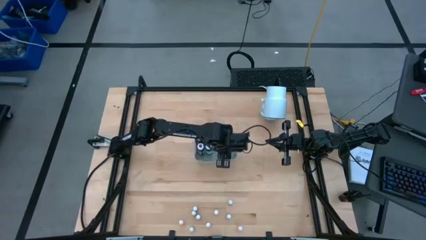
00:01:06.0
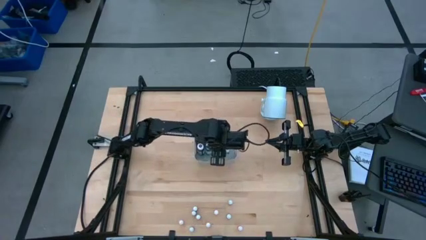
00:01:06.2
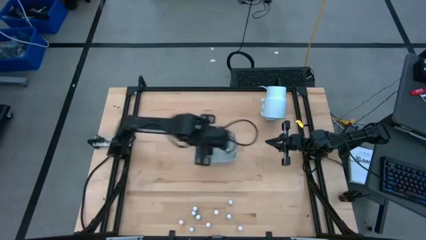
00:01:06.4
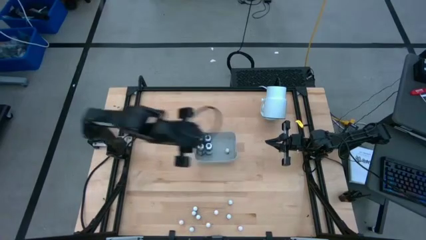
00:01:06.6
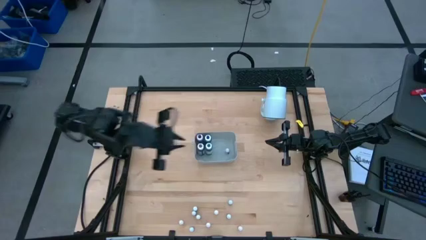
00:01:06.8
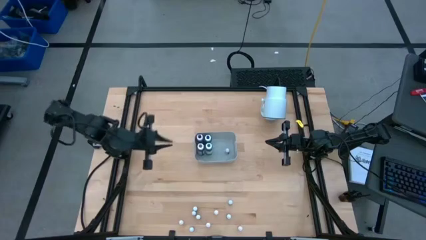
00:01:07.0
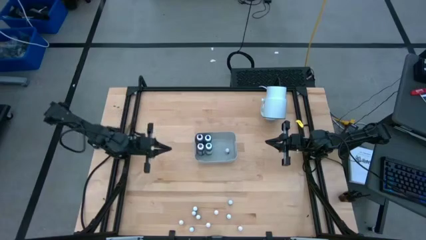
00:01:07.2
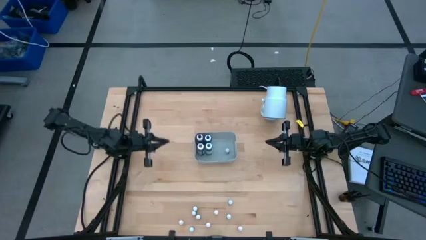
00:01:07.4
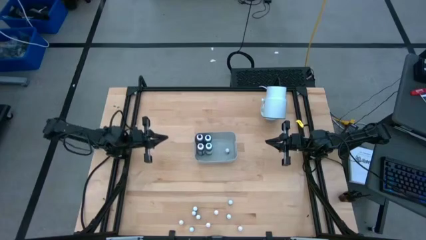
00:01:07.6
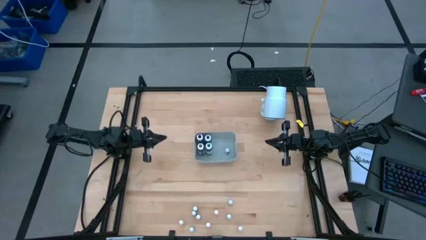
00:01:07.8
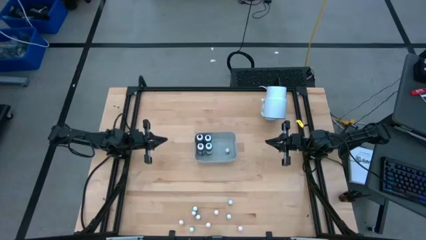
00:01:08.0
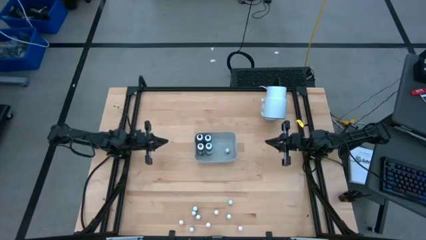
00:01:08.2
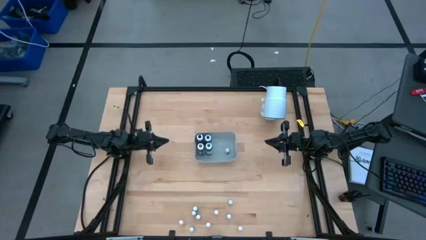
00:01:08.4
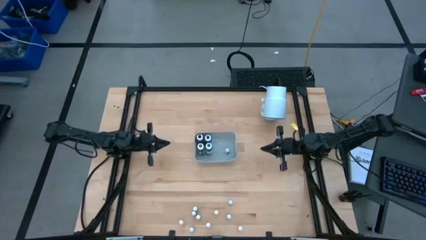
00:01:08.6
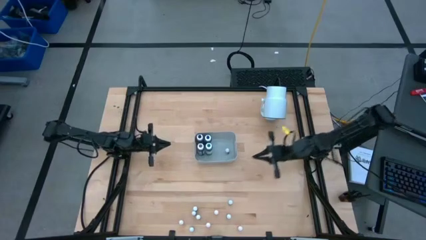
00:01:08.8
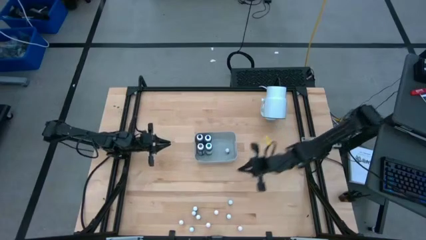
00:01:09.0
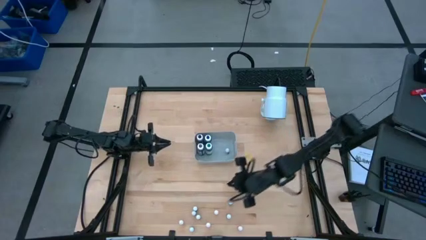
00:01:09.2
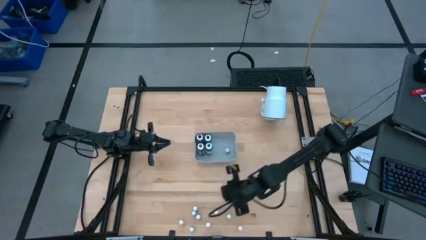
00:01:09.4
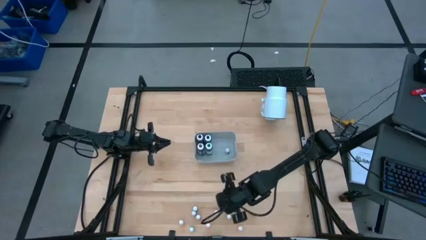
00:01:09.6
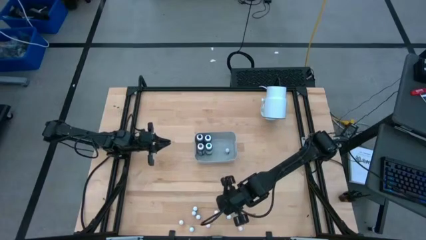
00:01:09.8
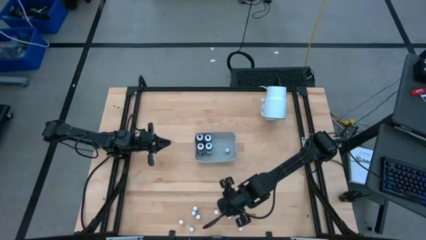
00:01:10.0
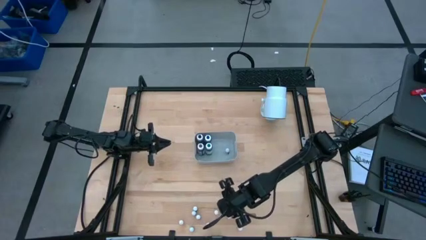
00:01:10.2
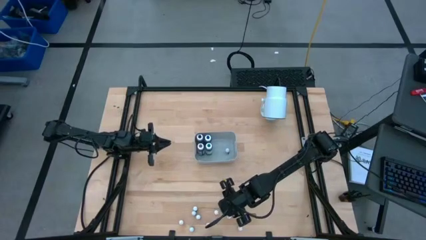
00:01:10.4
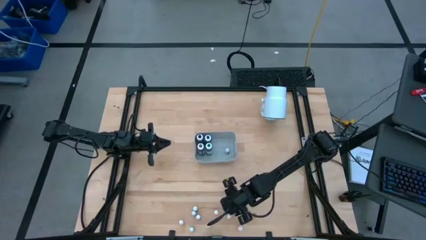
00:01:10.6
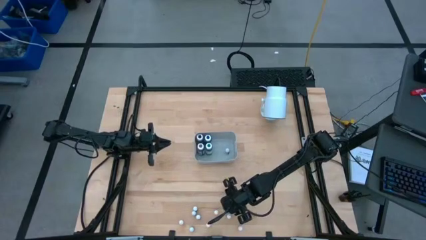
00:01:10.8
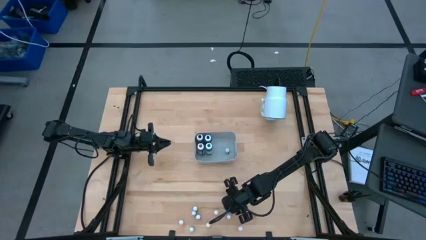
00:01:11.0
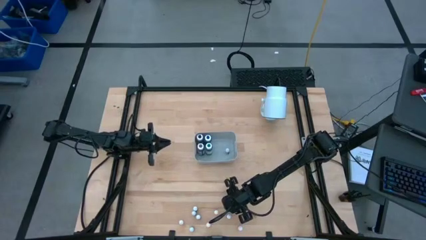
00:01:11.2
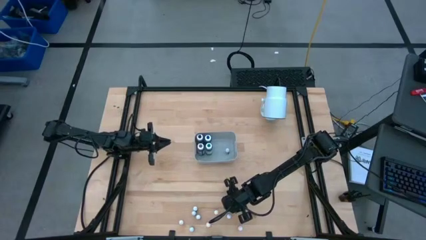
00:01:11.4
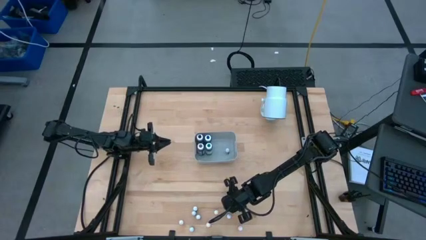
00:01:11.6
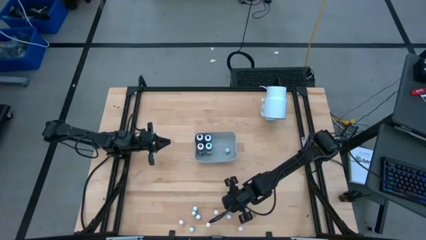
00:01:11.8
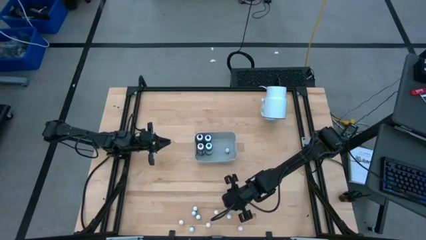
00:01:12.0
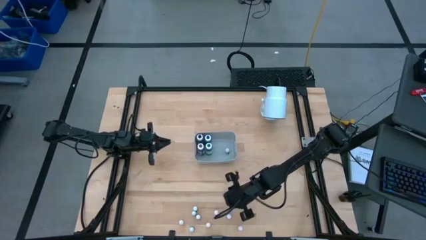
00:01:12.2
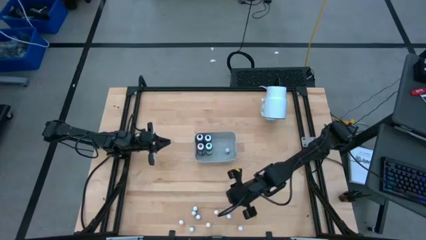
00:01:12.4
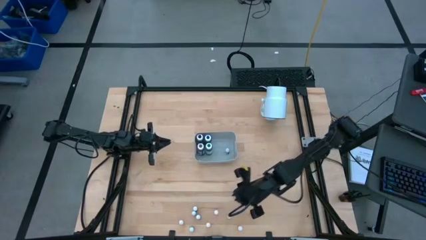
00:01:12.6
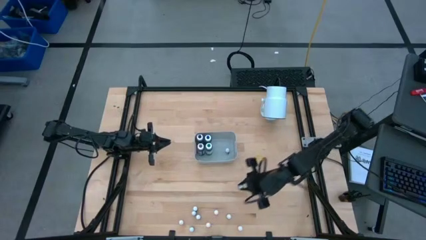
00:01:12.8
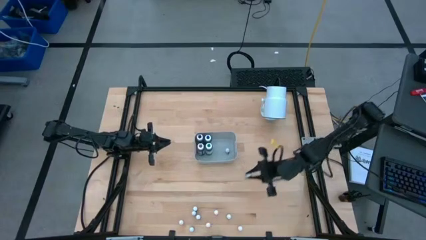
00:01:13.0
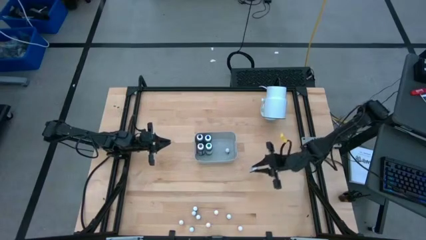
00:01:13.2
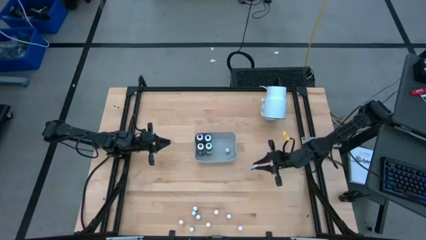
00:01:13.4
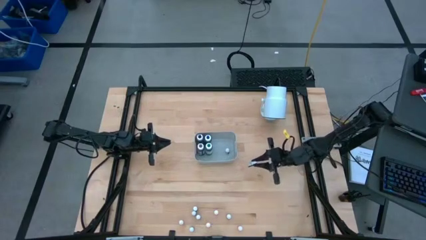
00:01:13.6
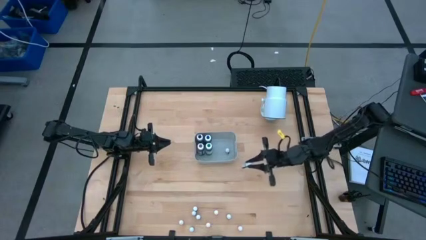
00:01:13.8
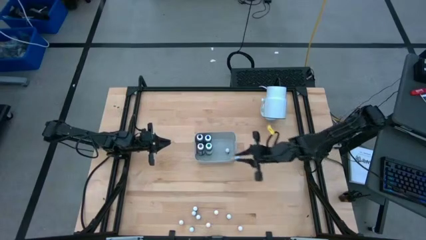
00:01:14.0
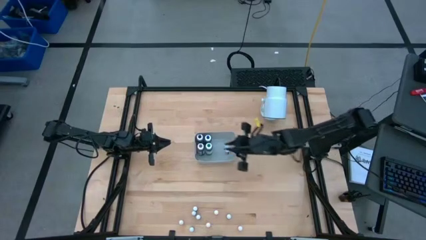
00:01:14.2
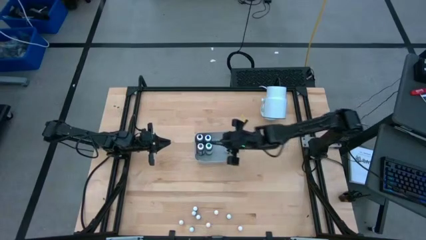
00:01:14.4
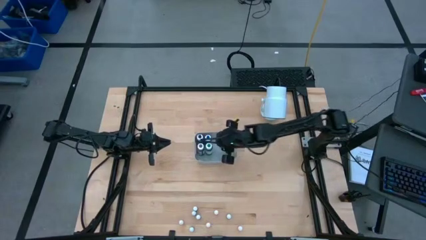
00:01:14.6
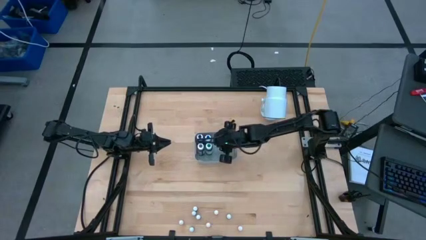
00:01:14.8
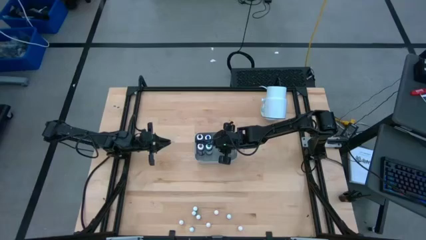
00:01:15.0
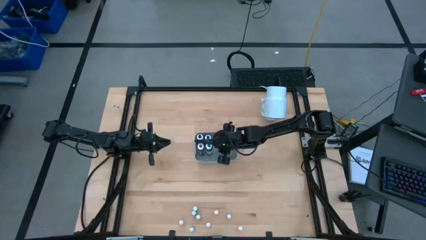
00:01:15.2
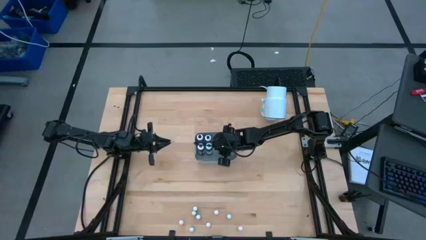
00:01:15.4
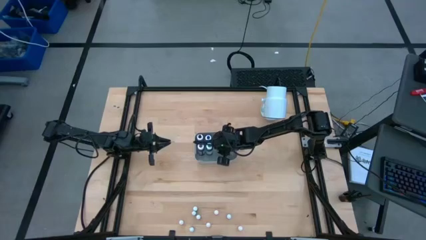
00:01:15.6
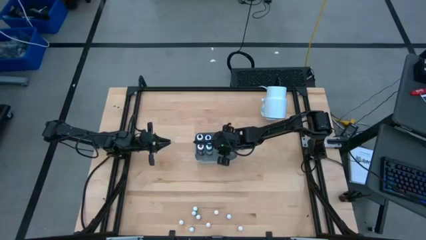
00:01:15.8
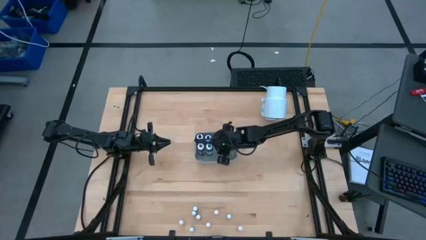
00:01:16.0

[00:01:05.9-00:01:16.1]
Task: Pick & Place food coloring
Put the small green food coloring bottle into the white bin

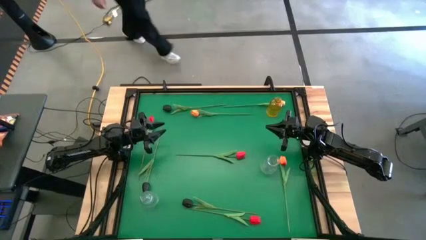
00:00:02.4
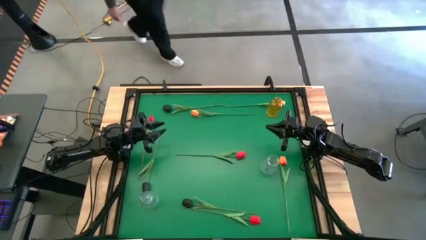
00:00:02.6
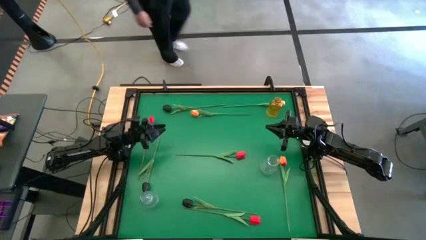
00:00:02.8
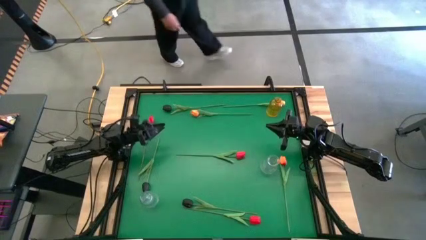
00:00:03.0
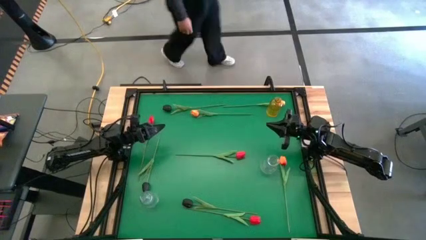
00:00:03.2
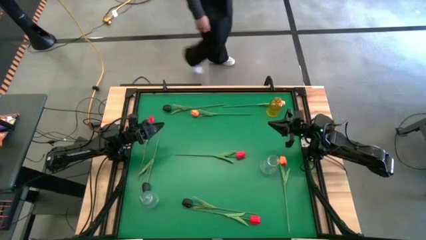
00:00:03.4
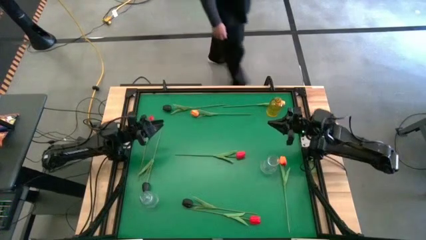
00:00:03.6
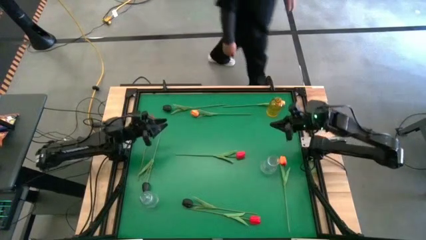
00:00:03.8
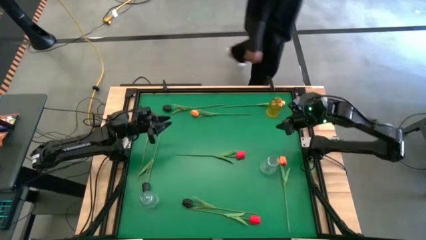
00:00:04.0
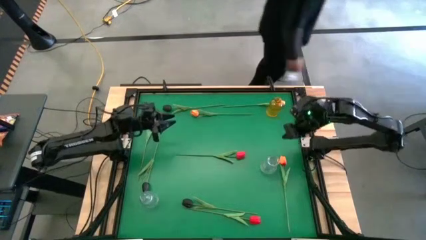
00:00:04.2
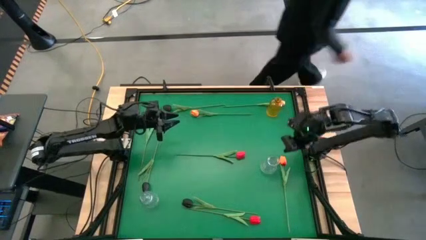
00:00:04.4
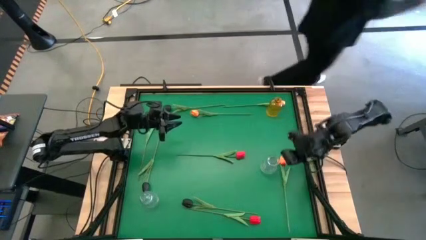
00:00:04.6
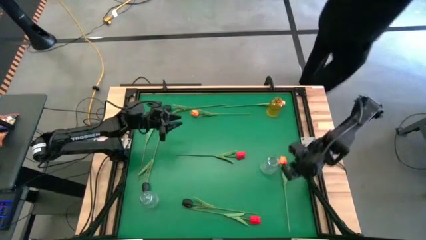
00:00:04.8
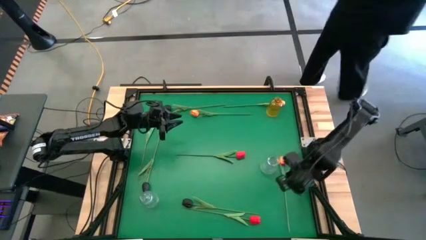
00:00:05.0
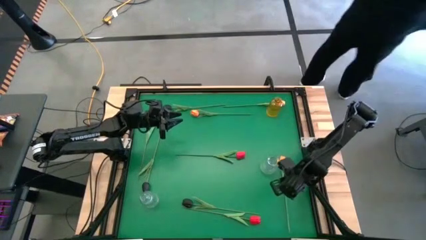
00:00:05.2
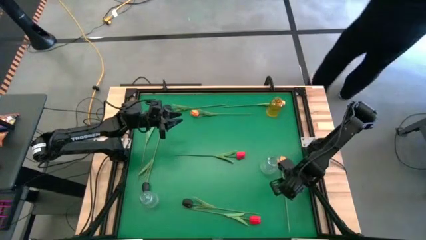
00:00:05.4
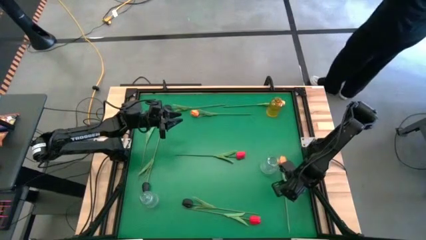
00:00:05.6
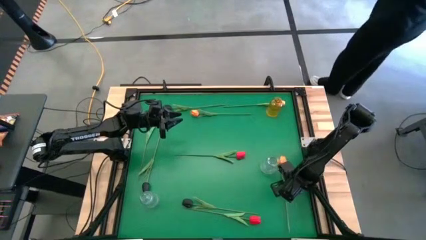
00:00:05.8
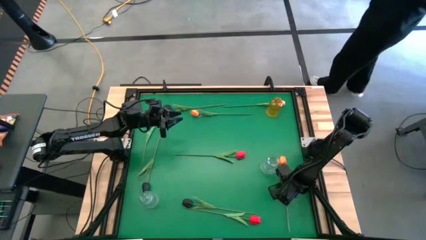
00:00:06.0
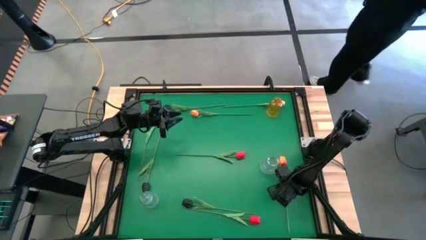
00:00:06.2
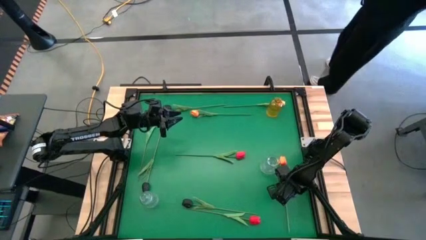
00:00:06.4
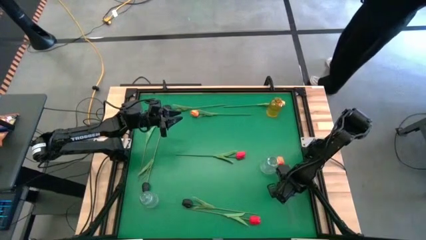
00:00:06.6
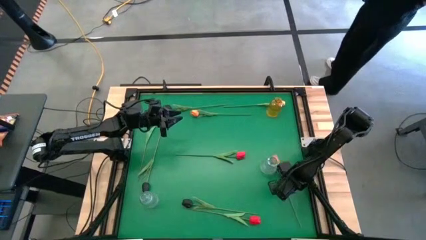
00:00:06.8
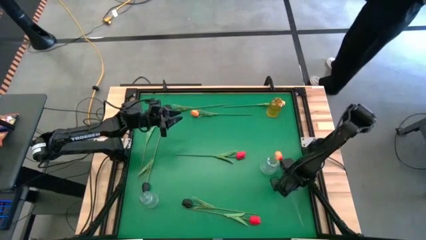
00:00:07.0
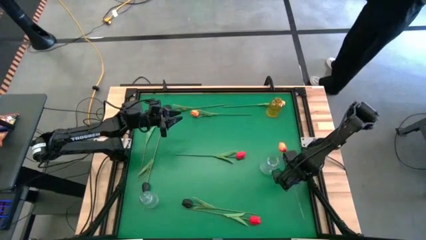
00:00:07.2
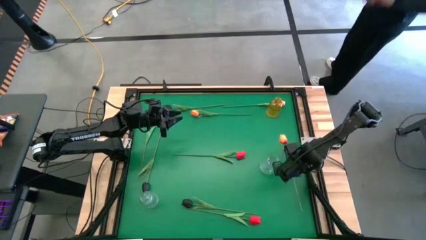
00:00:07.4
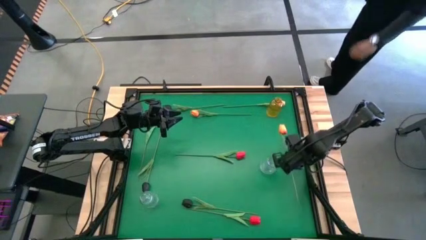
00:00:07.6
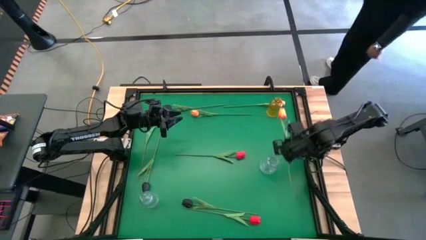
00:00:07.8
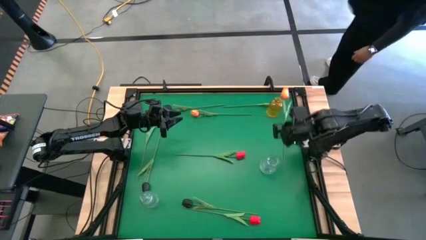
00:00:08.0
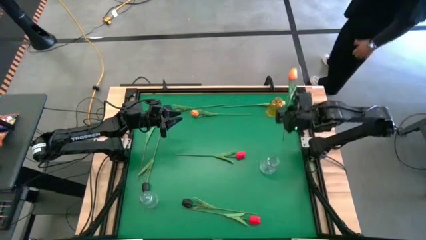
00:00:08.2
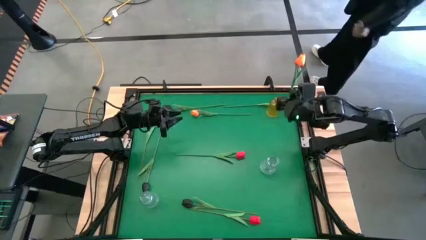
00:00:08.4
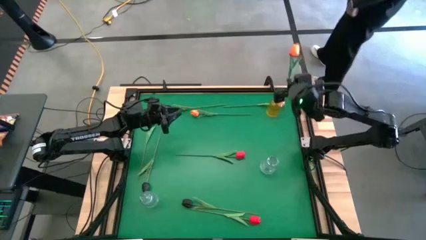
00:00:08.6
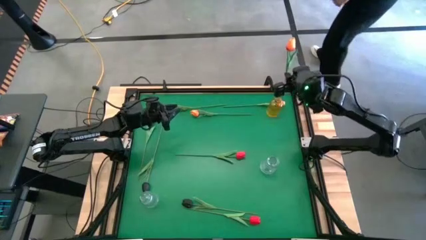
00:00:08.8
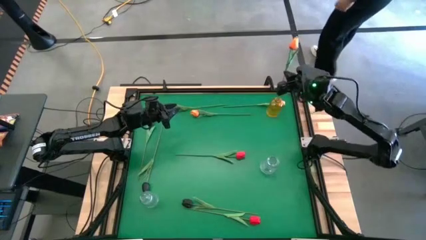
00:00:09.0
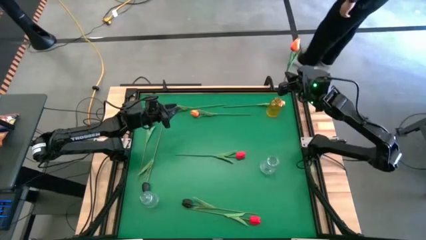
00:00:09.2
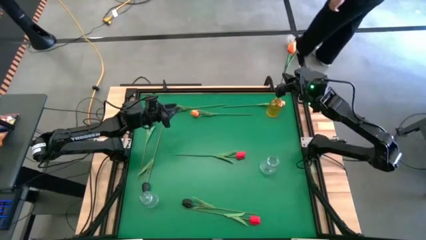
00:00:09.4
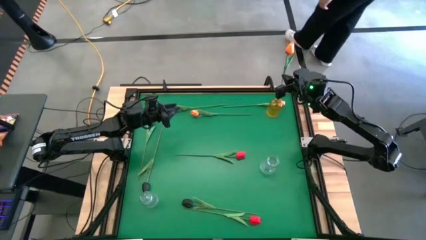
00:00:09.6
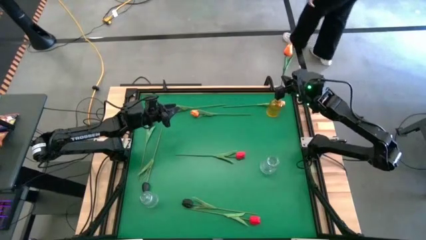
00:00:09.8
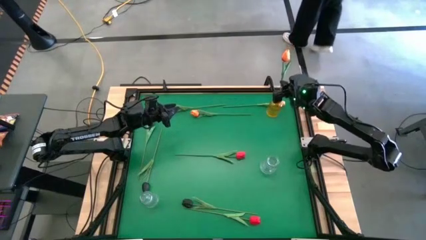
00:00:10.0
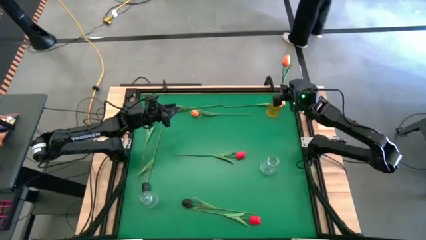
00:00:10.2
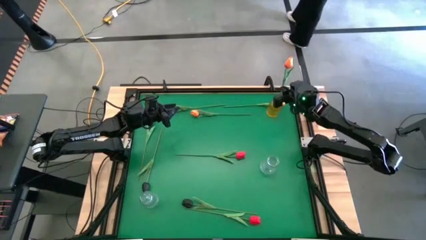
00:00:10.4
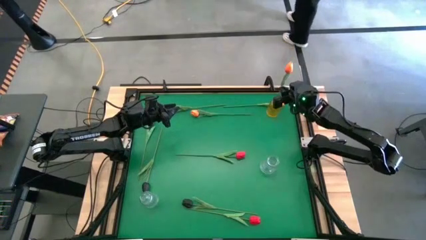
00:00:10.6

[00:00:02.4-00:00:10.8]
Task: Sort flowers into vase by color
Put the bottom right orange tulip into the yellow flower vase
